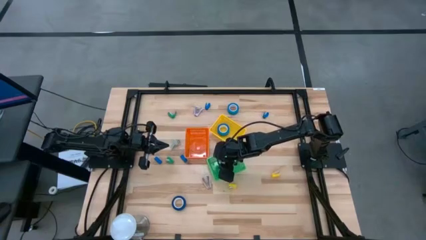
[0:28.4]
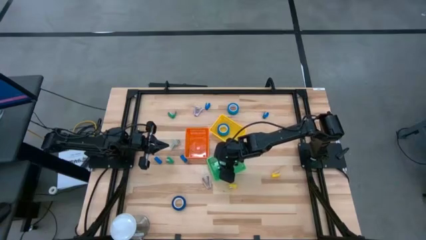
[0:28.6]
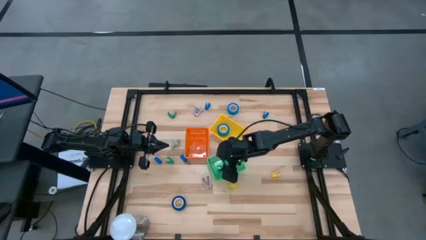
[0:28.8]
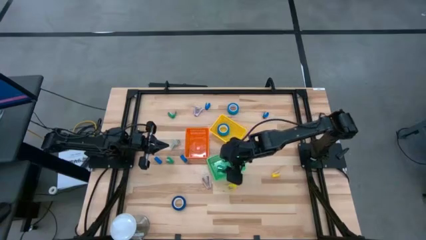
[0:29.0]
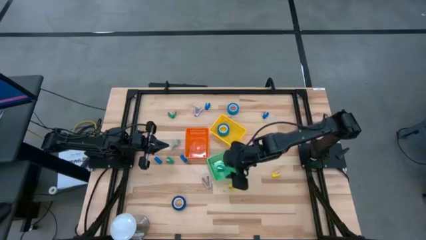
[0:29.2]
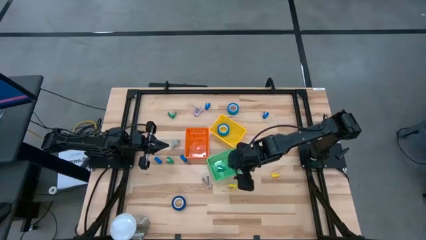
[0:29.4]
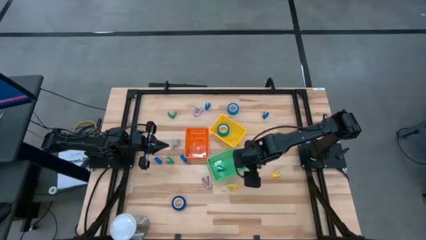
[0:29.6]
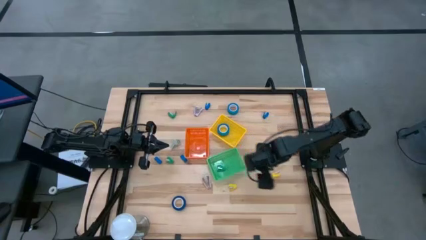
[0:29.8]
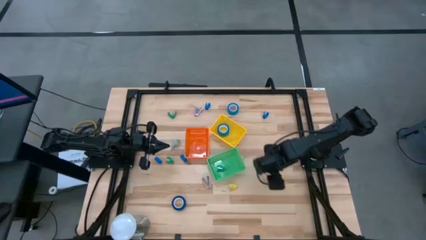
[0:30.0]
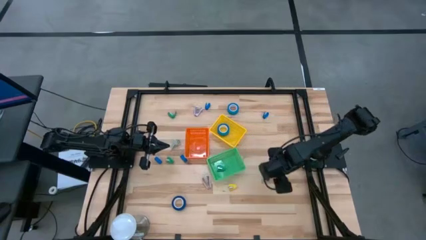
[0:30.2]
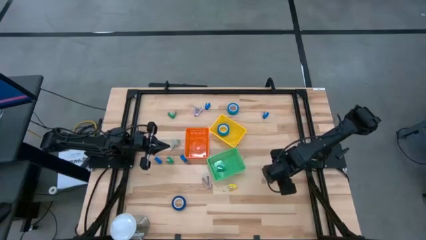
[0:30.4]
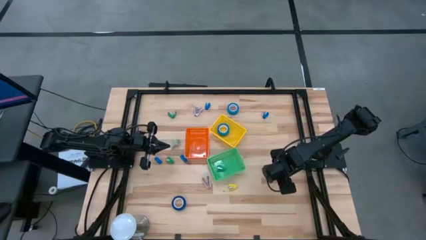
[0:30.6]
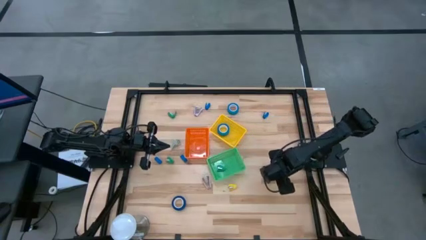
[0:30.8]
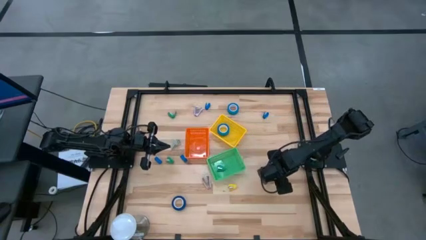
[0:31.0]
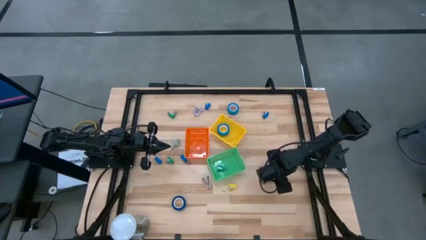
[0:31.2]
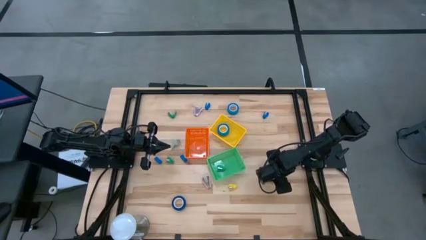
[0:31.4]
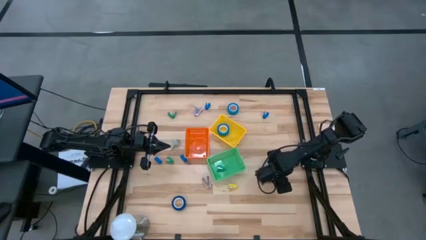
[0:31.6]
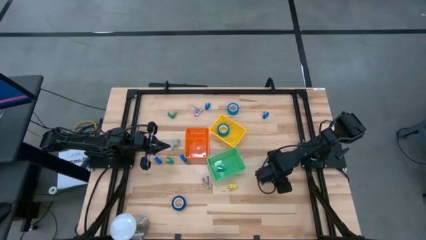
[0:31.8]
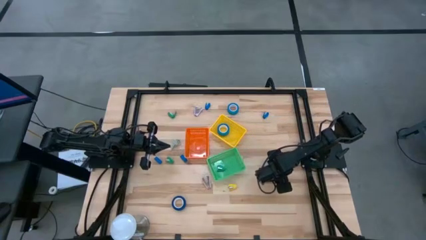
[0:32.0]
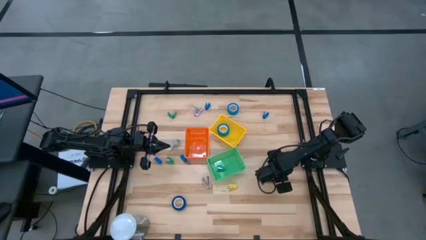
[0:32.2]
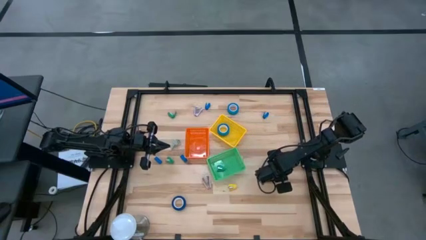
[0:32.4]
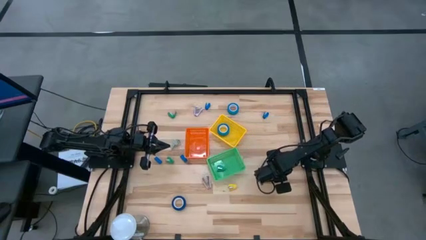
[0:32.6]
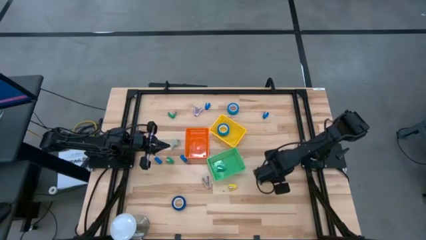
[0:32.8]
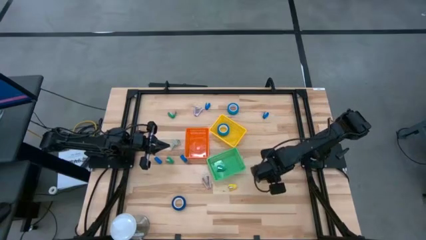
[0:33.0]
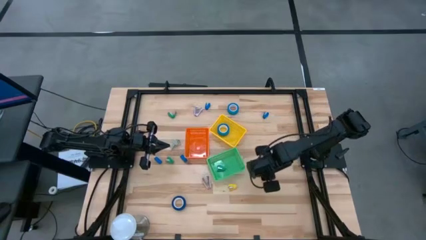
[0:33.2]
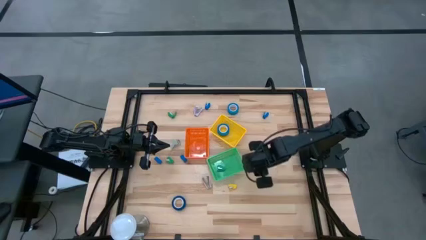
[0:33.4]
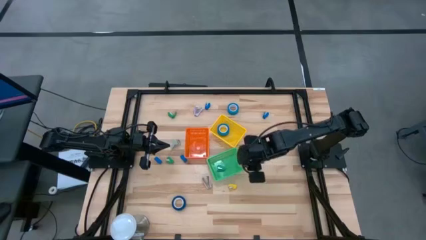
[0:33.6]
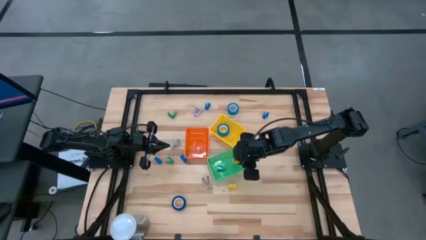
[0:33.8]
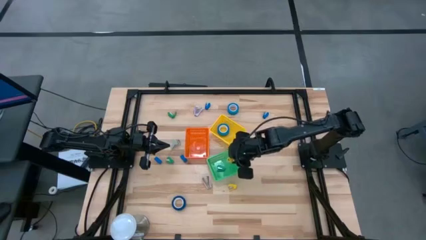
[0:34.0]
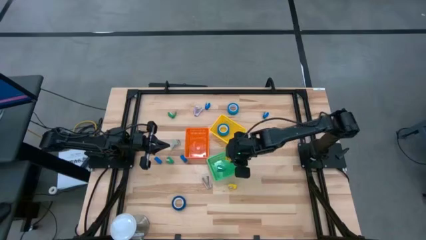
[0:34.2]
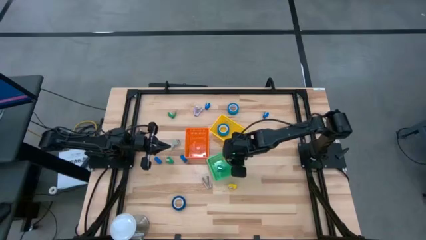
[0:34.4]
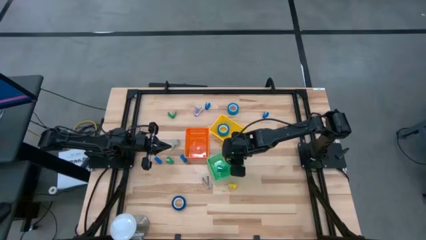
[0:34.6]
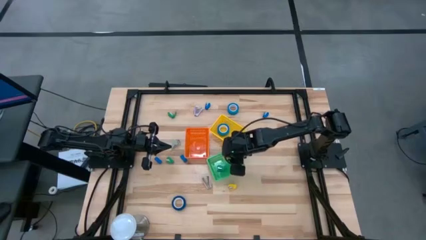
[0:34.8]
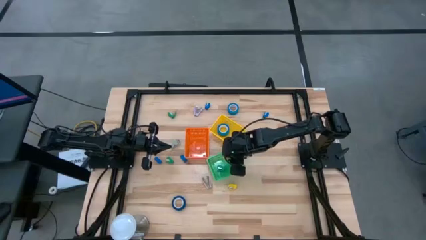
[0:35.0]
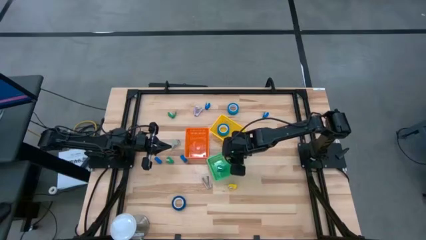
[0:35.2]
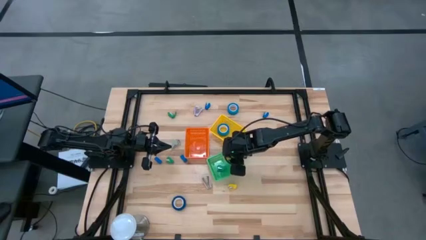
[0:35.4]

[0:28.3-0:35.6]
Task: Pick and place Stapler, Stapler remover, tape
Put the yellow stapler into the green bin

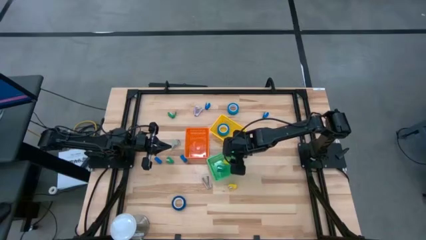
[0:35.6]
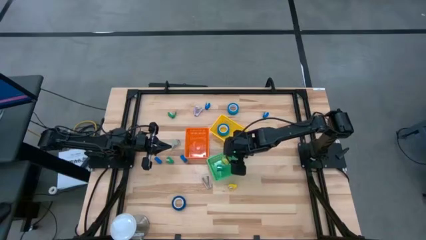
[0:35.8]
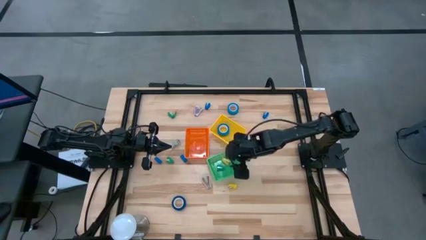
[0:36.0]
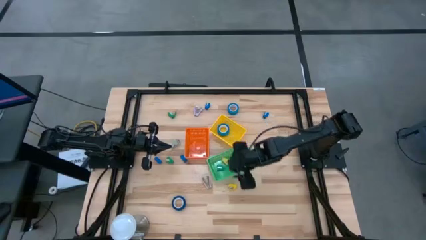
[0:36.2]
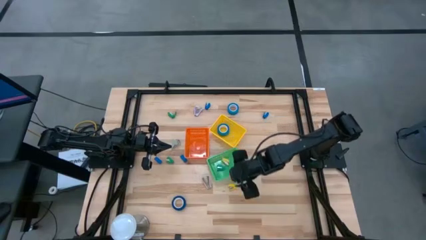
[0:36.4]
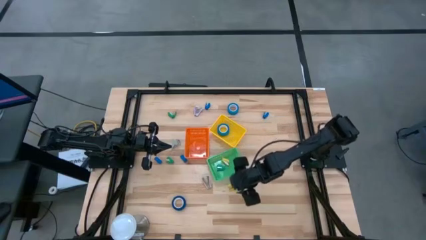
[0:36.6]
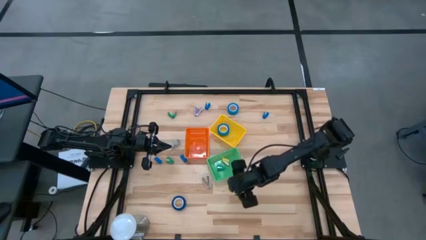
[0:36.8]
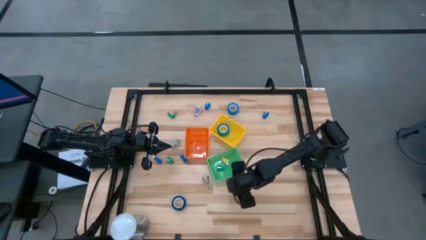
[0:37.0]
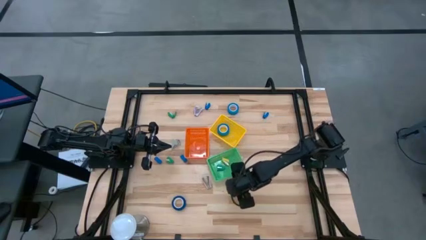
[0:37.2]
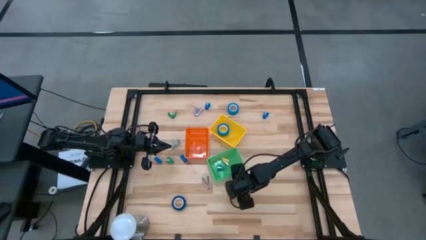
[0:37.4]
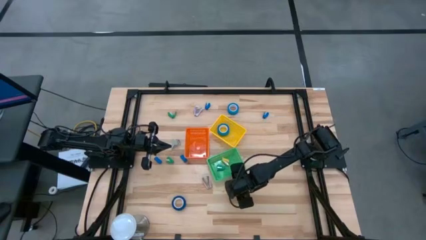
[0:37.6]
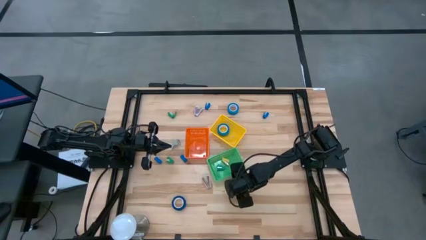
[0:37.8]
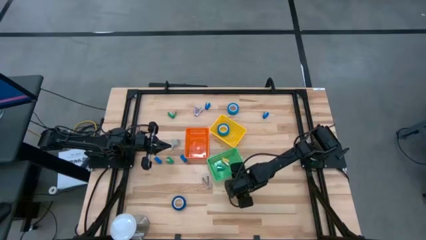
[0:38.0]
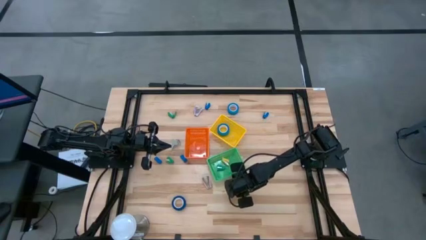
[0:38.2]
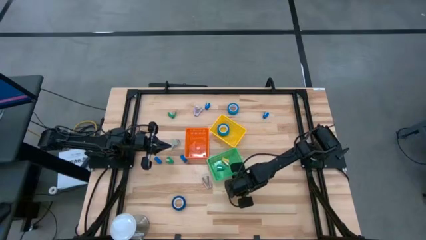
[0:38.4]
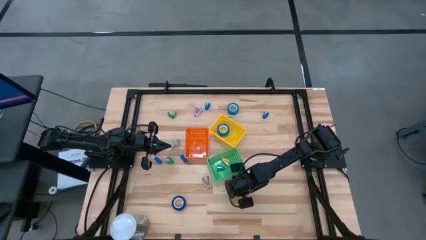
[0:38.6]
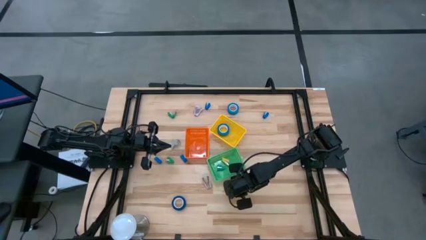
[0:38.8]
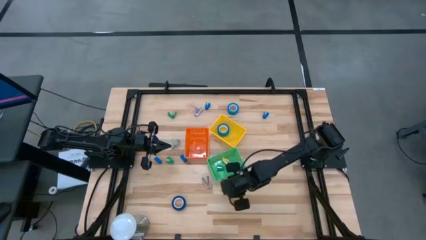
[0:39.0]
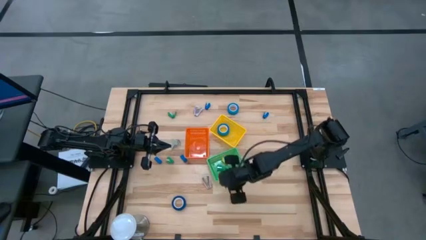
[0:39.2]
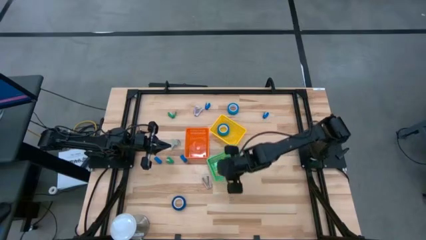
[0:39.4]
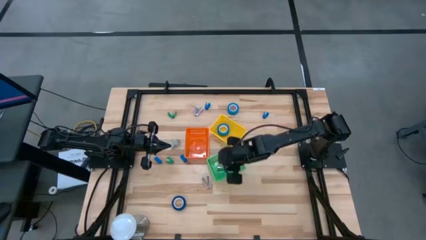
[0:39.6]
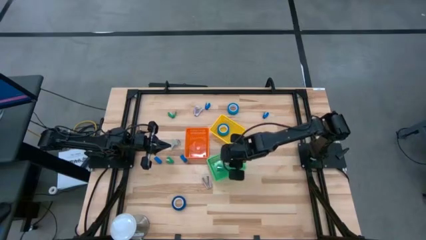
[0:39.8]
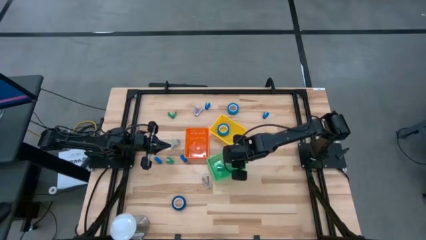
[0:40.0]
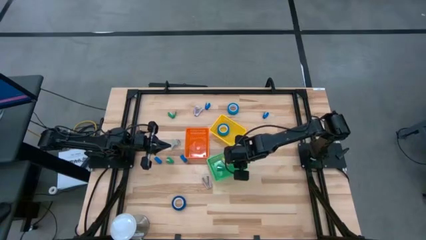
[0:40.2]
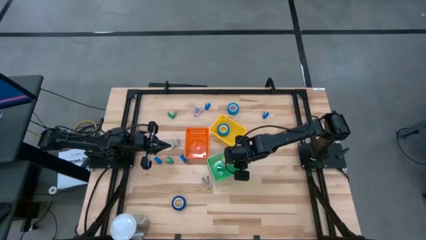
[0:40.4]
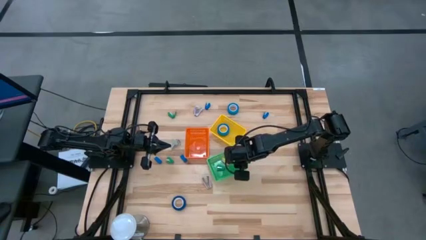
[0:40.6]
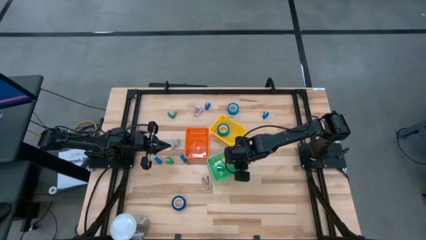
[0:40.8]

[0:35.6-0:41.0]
Put the yellow stapler into the green bin
